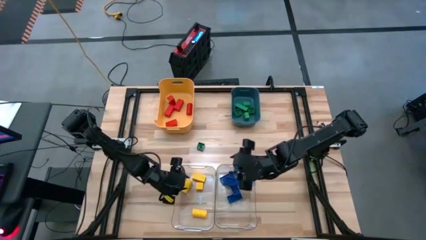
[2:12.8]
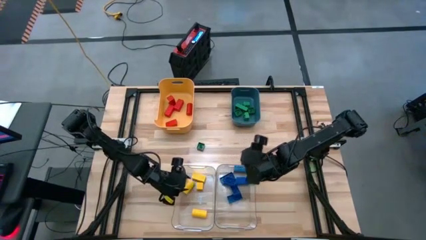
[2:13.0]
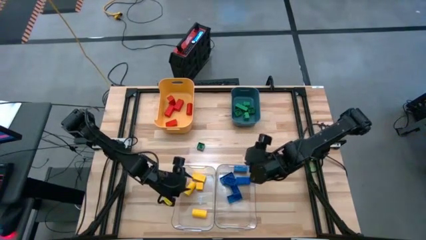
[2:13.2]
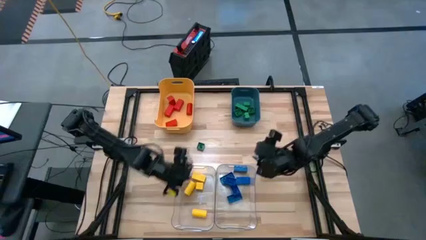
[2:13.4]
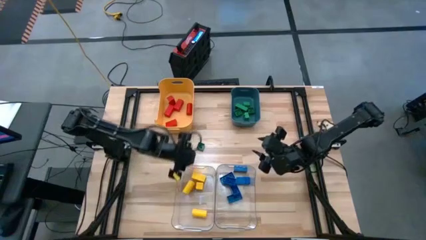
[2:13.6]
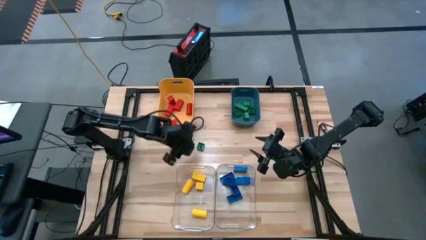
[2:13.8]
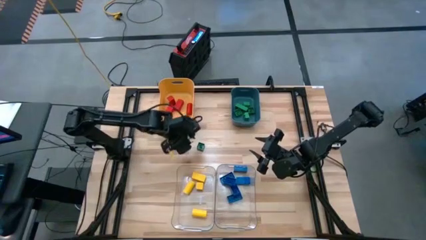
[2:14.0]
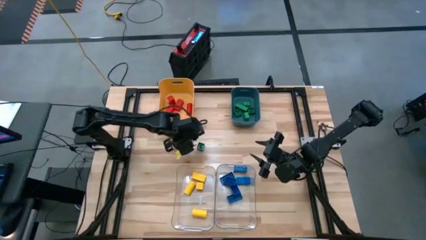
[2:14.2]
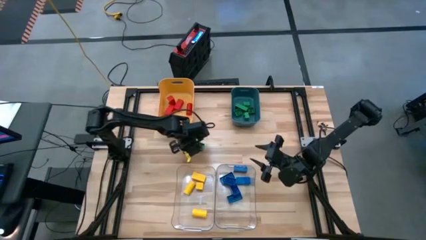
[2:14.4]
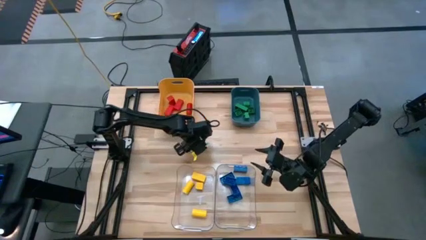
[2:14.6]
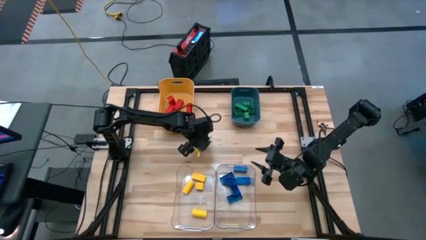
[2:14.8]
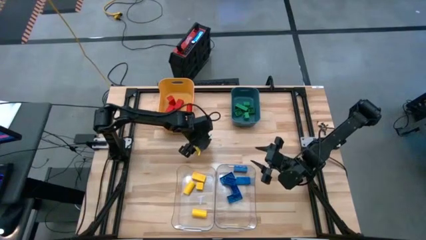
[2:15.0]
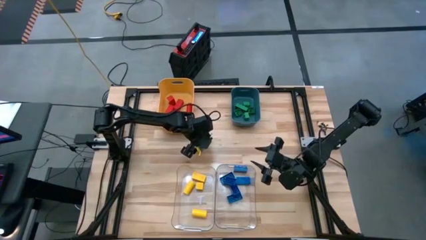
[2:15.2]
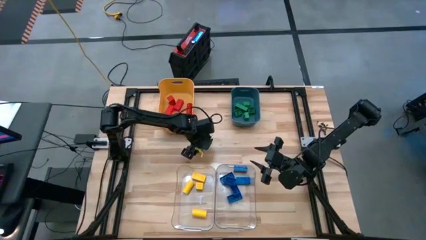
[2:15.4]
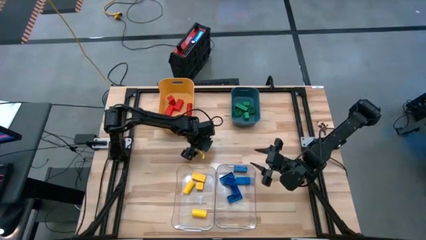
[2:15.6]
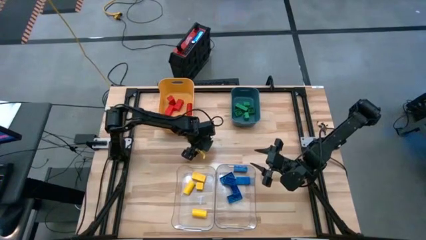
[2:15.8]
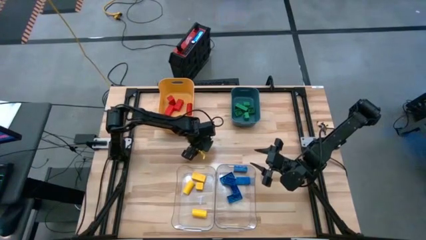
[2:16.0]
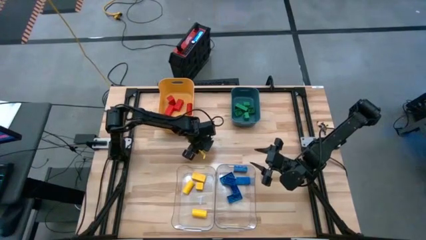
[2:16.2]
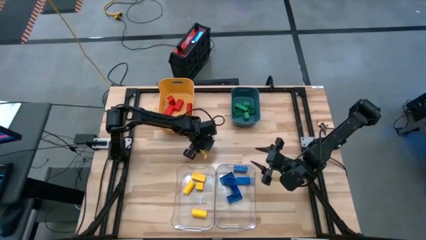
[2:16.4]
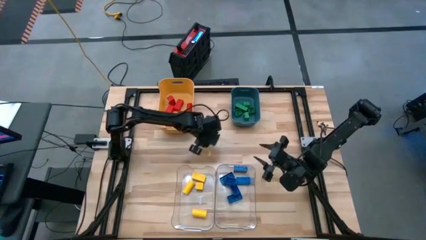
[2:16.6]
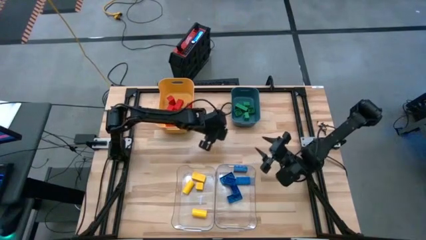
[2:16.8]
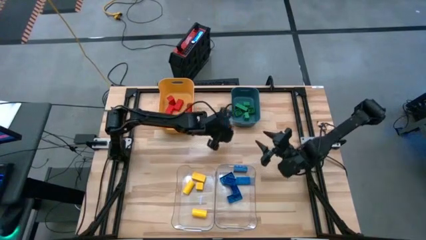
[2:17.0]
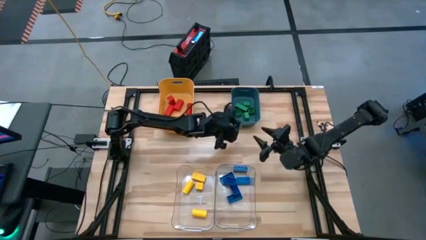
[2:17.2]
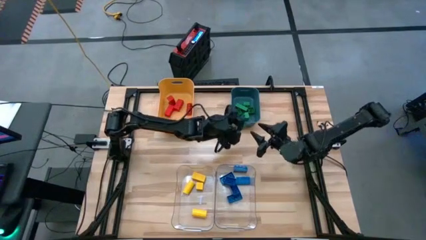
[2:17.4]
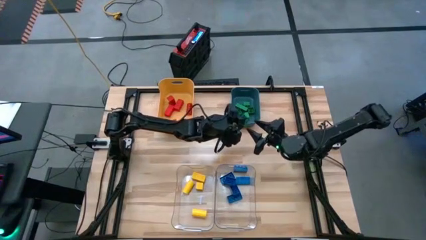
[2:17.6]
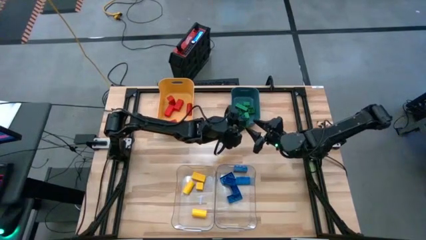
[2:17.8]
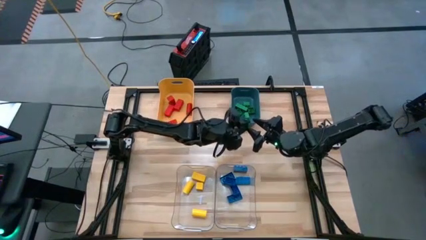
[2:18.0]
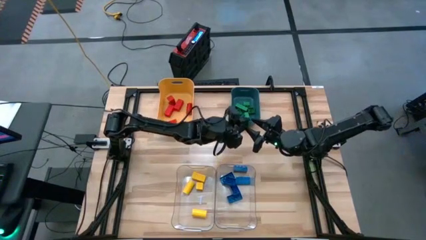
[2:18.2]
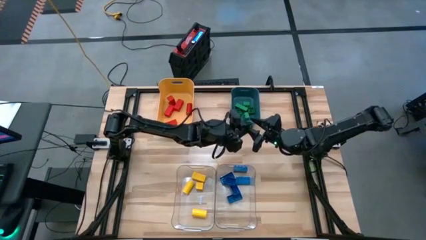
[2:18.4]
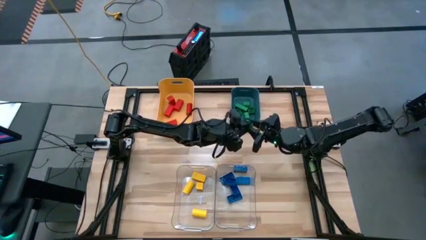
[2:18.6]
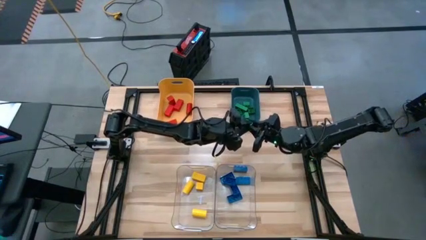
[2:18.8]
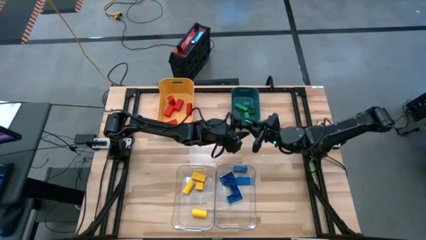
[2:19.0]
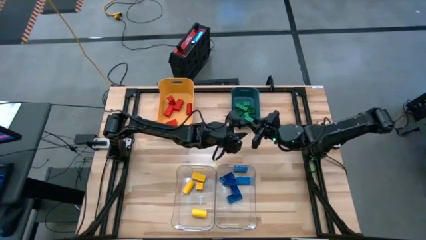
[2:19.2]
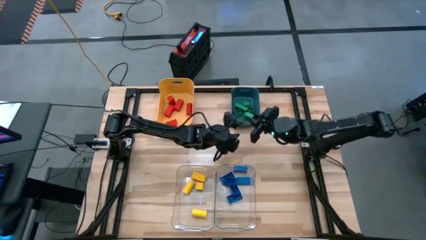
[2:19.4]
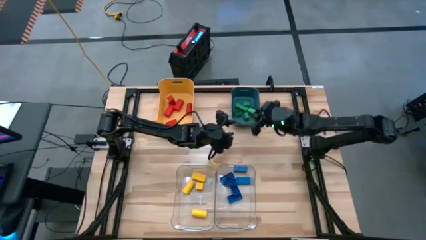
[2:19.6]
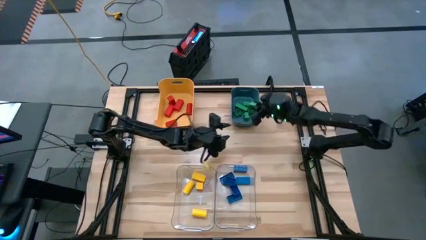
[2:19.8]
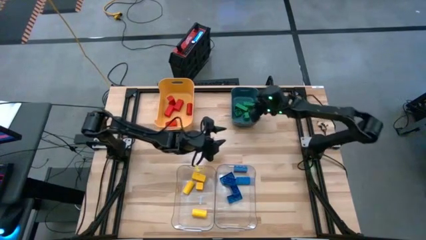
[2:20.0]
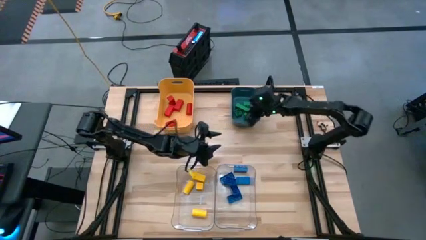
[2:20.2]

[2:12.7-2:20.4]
Task: Sort blocks
Put the green game piece into the blue bin

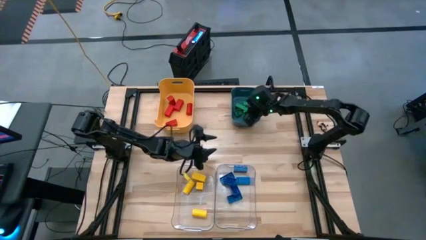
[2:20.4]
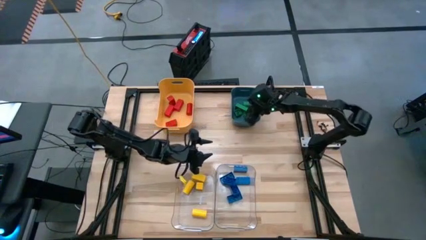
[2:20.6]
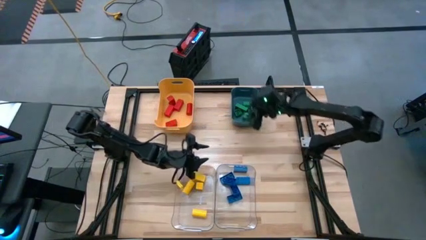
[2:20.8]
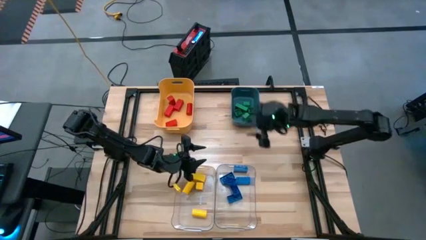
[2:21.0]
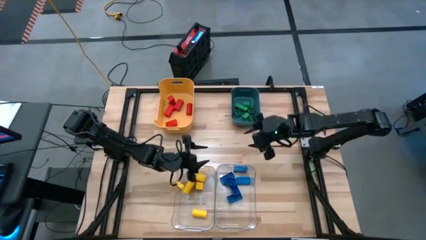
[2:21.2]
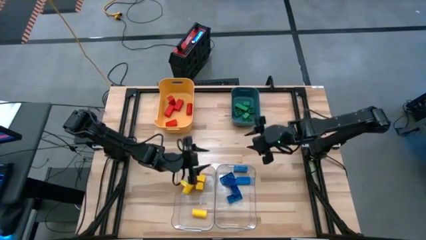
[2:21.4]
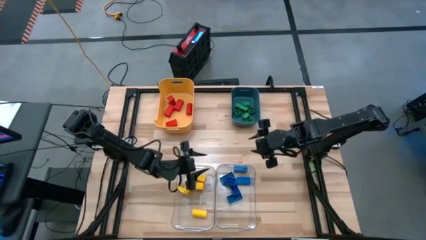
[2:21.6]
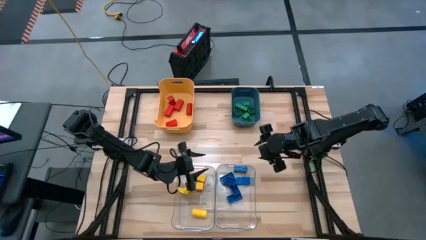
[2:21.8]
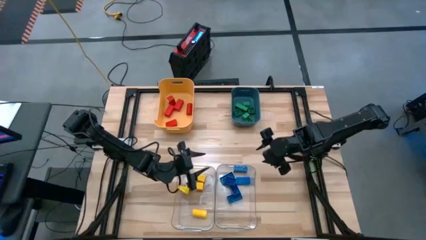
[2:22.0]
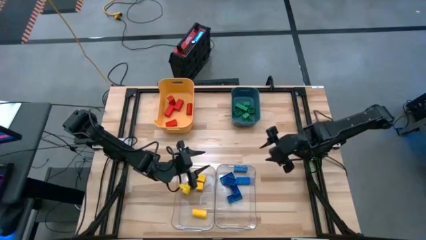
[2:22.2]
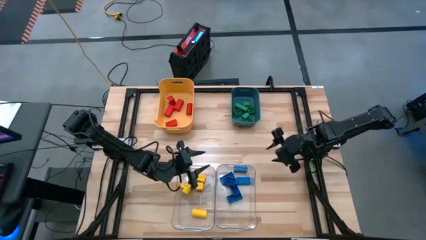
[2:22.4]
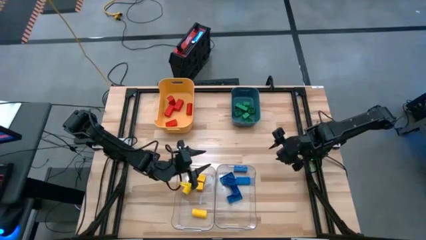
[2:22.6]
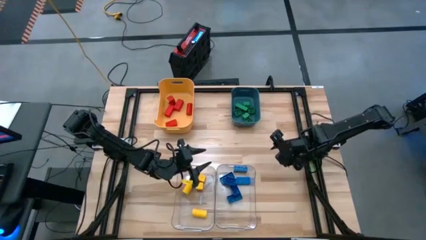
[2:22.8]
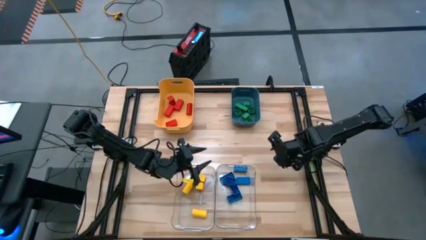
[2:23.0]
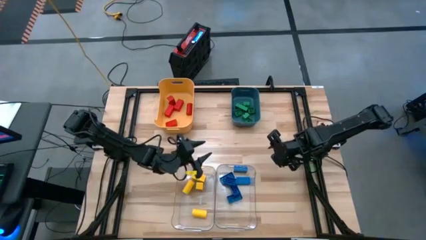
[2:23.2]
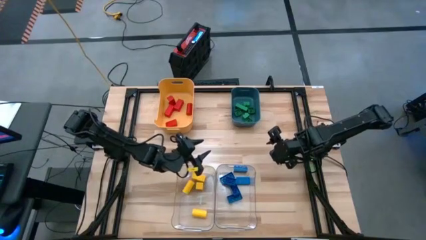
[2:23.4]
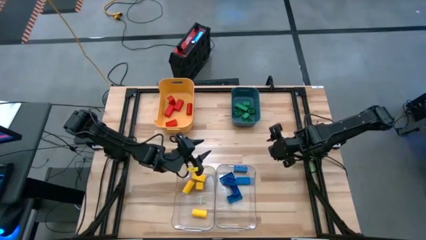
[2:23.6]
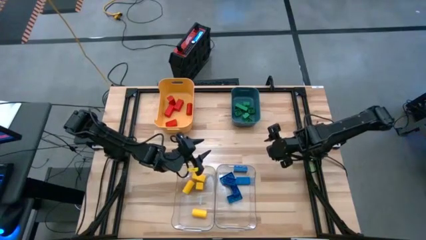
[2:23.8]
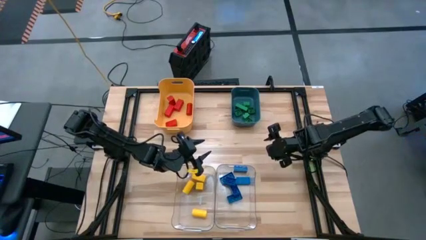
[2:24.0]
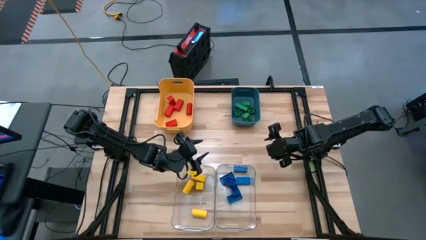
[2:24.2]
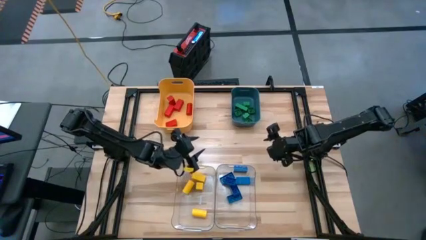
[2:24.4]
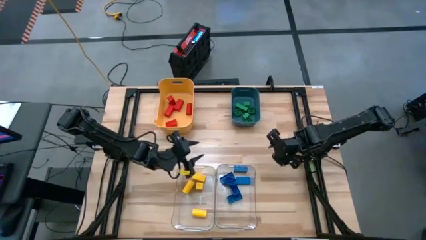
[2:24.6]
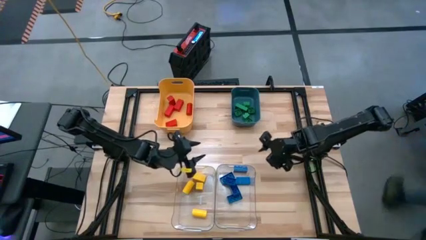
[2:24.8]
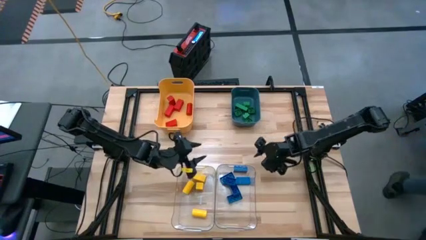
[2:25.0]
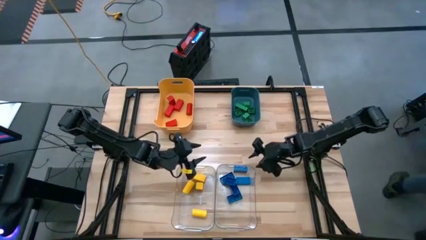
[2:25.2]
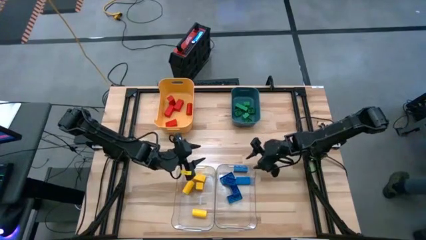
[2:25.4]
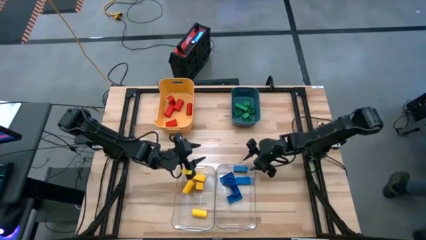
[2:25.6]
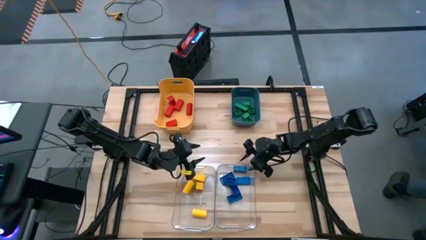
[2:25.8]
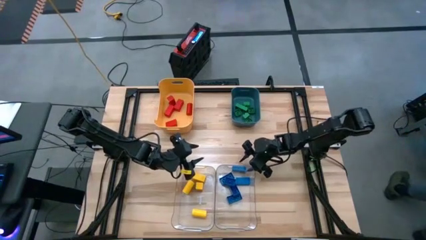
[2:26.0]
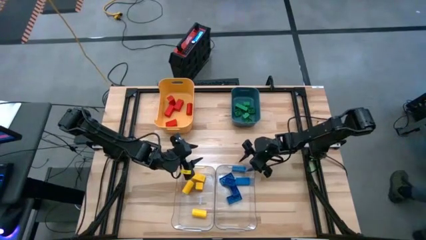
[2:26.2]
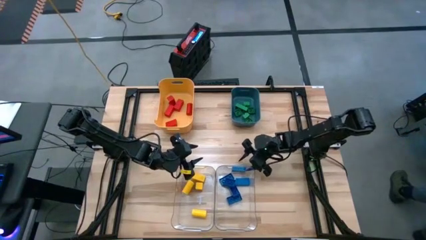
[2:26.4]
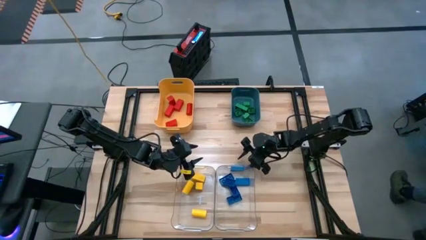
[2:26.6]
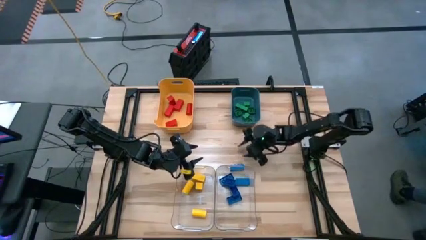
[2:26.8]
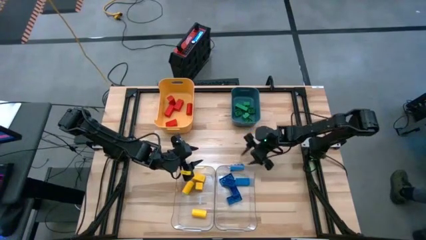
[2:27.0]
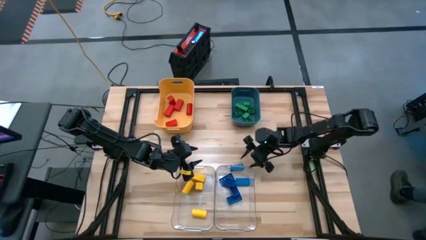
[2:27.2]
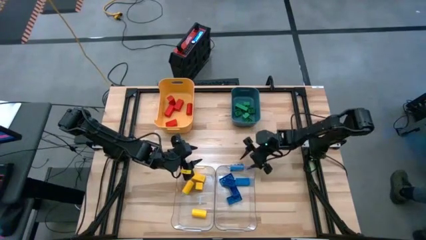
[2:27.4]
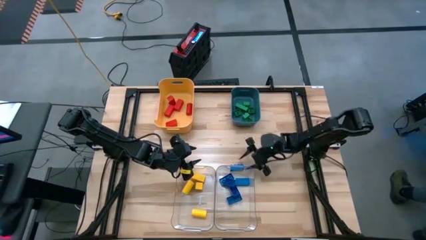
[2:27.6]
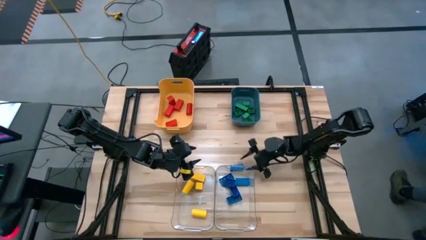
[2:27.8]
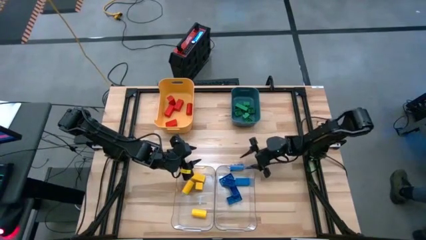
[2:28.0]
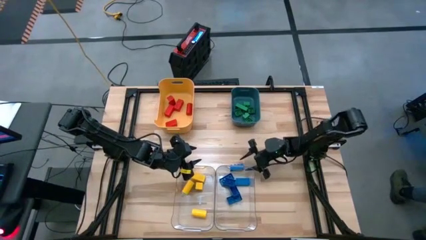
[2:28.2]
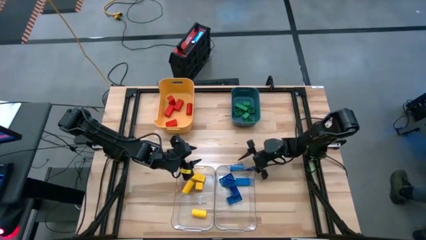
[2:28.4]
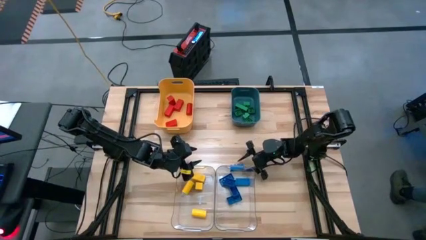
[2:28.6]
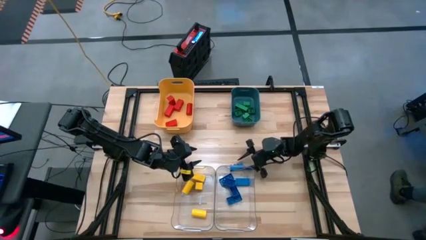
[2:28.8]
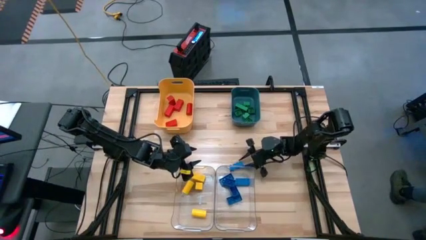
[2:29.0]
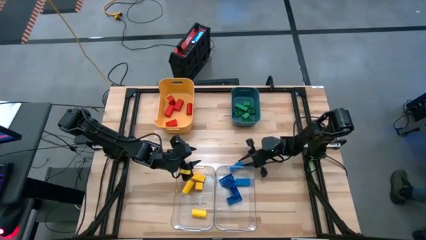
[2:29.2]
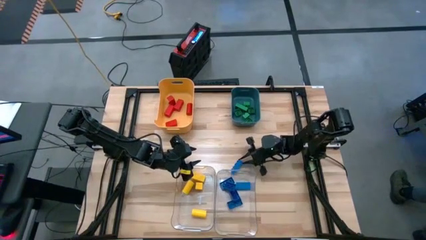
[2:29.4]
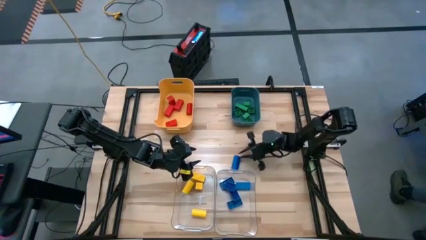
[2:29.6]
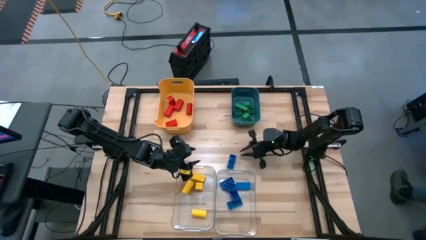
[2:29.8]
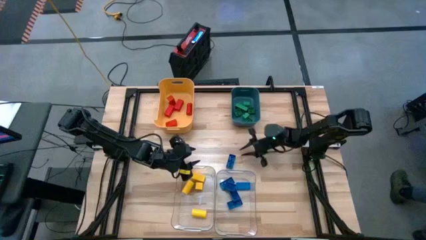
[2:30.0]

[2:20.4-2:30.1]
Put the blue game piece into the right transparent bin
